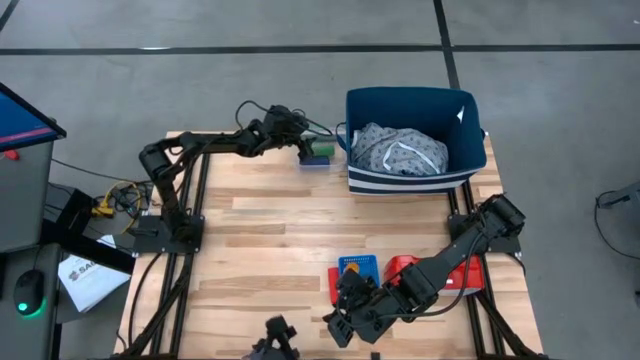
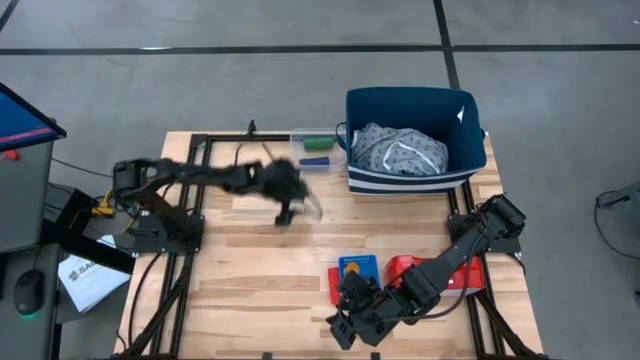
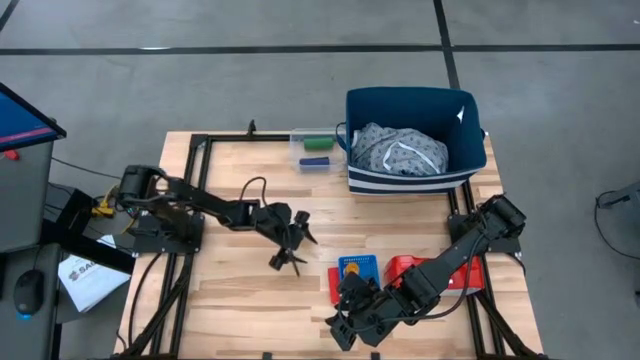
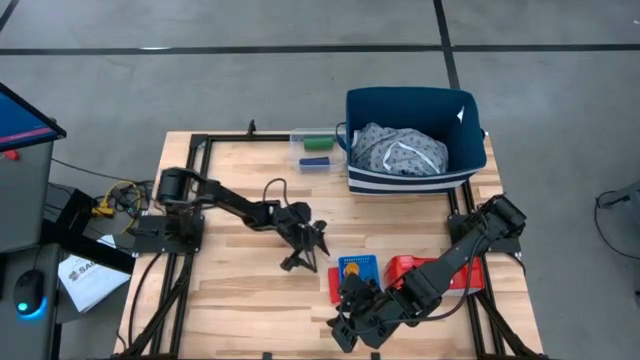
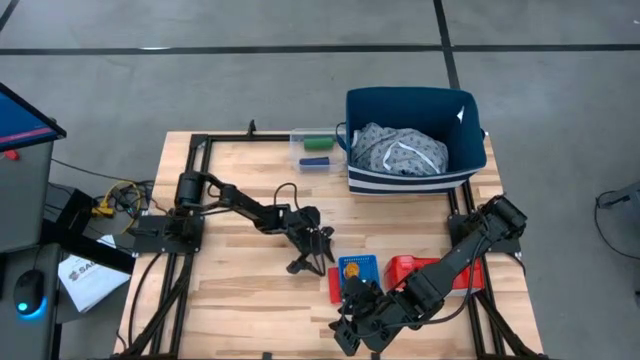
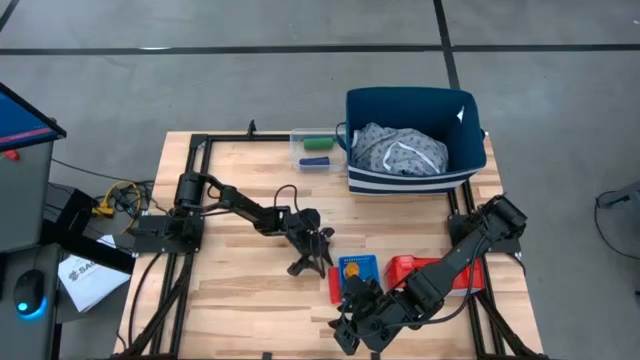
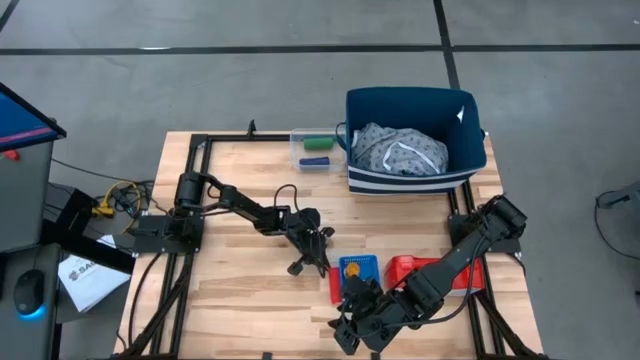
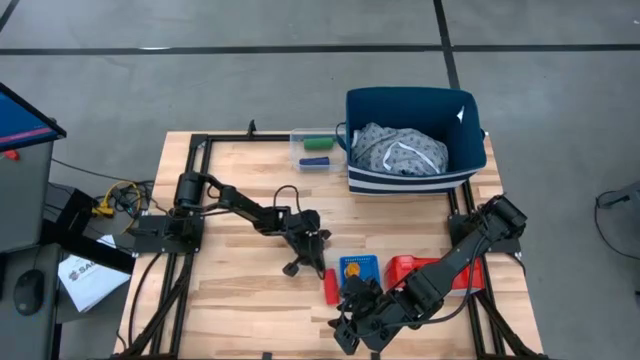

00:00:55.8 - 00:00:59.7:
Task: Pick & Place Medicine items
Put the red bandage into the transparent bin

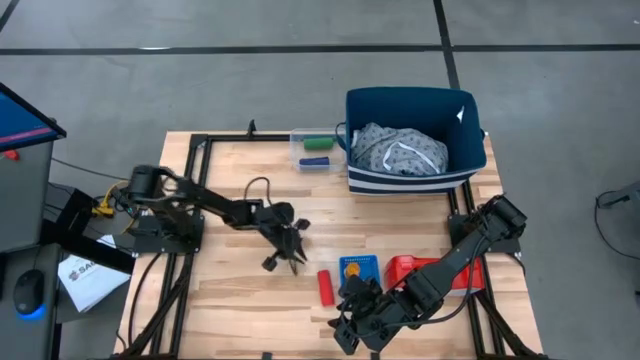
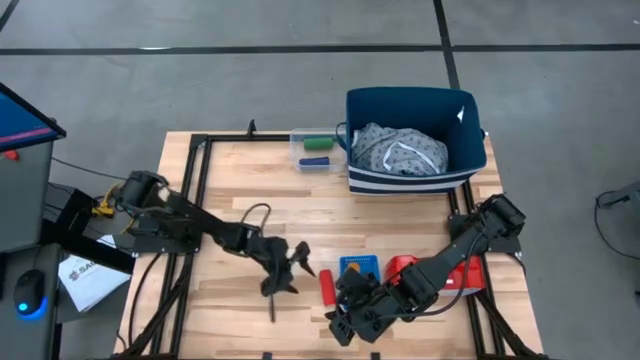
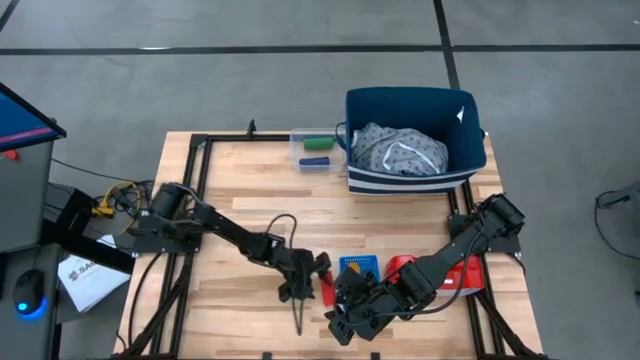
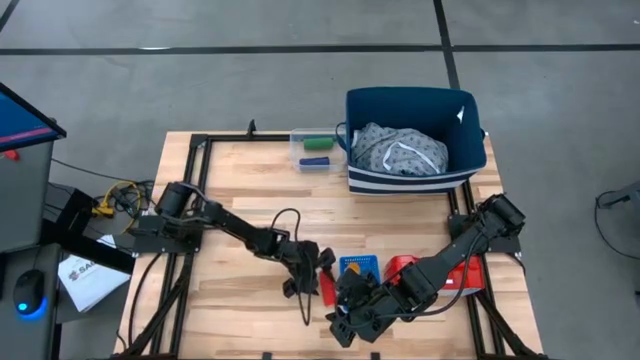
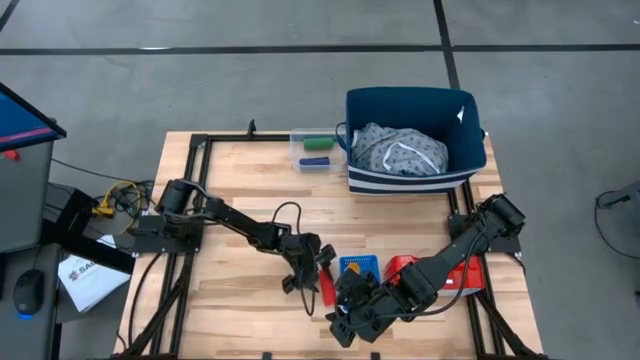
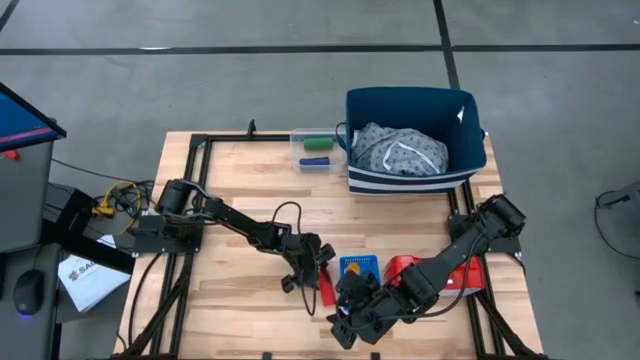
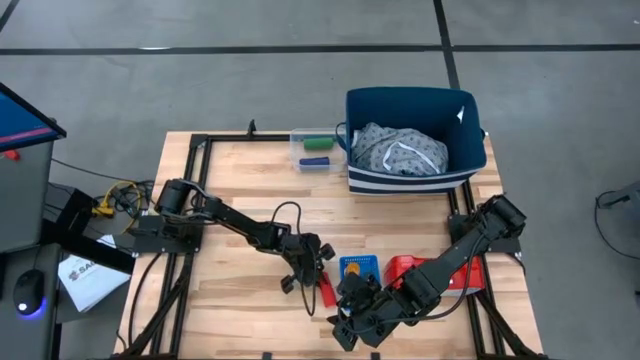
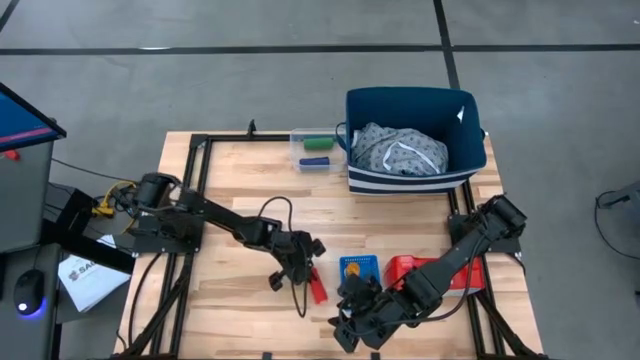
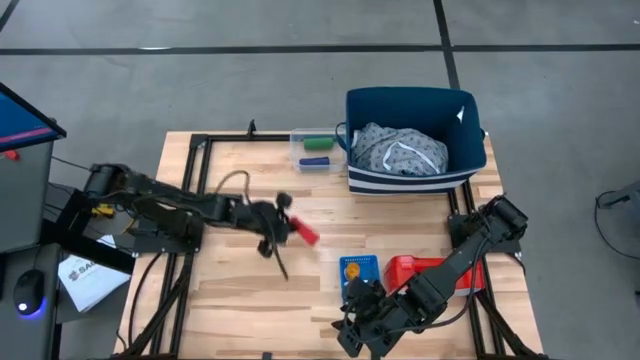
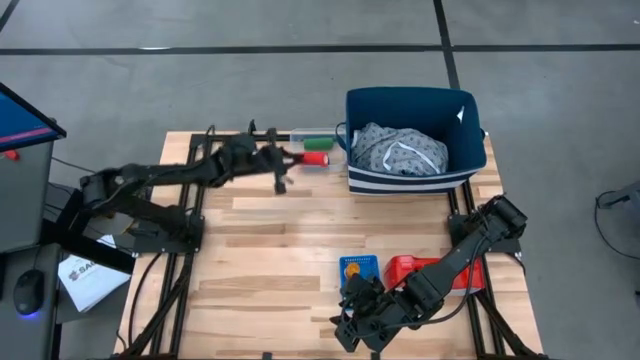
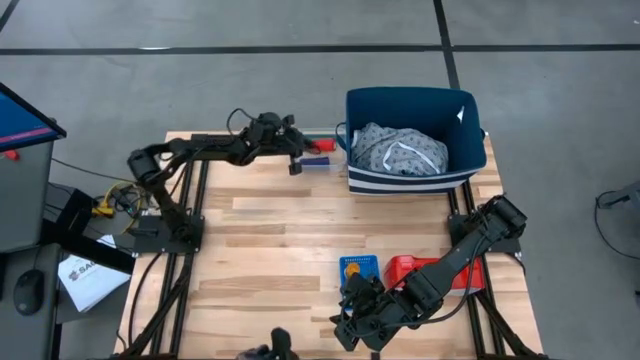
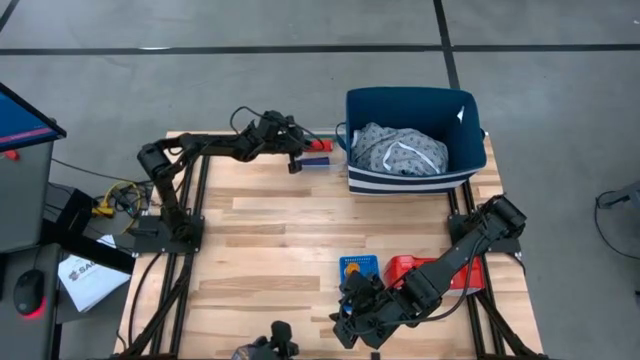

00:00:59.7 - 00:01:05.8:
Put the pink bandage into the transparent bin

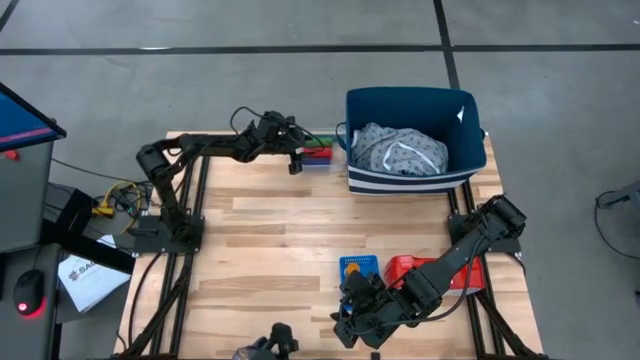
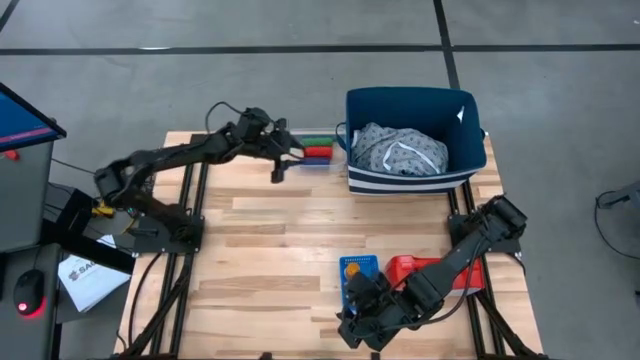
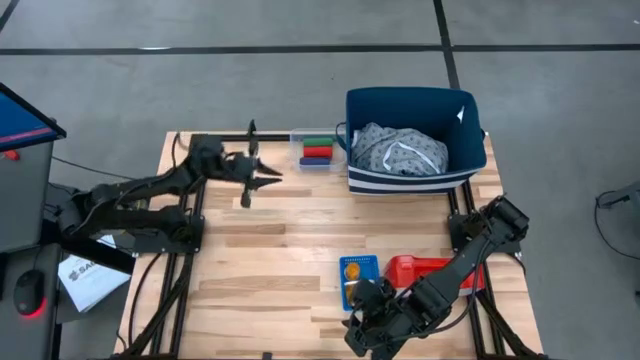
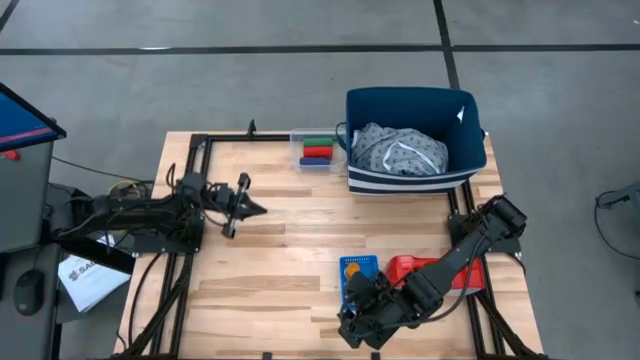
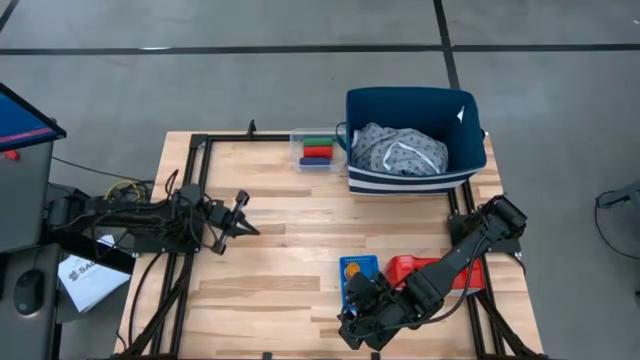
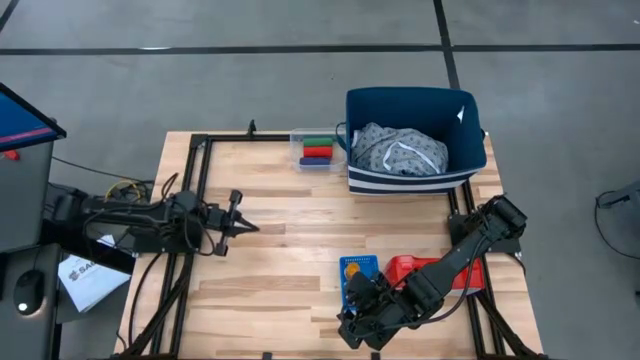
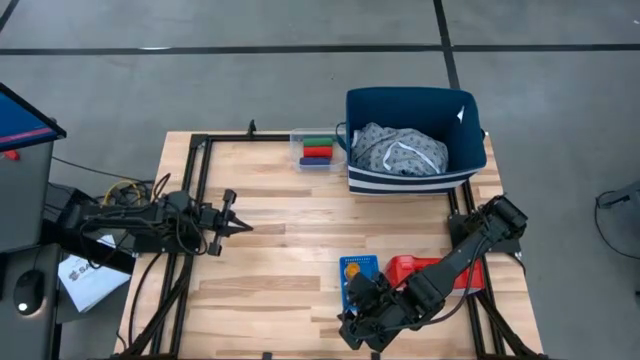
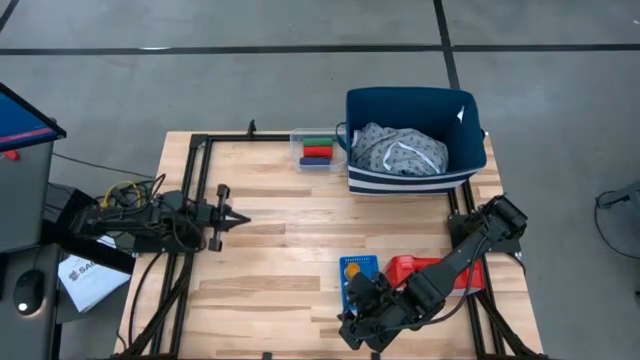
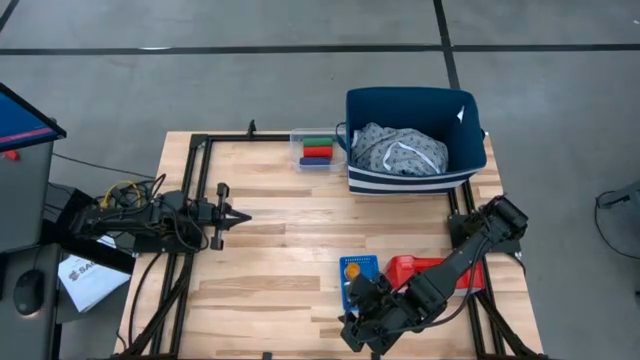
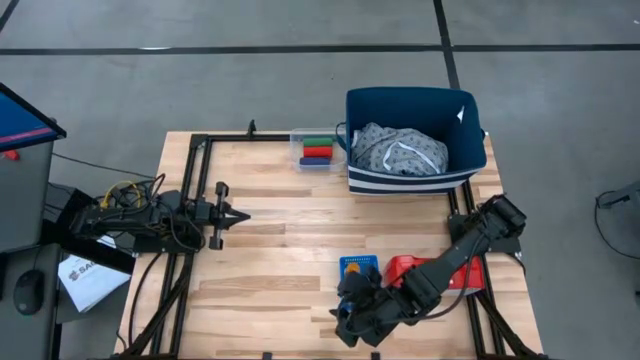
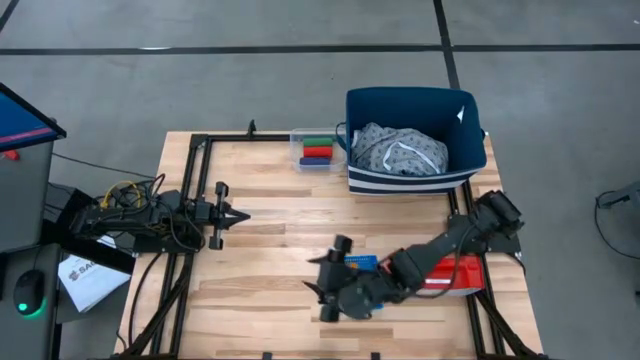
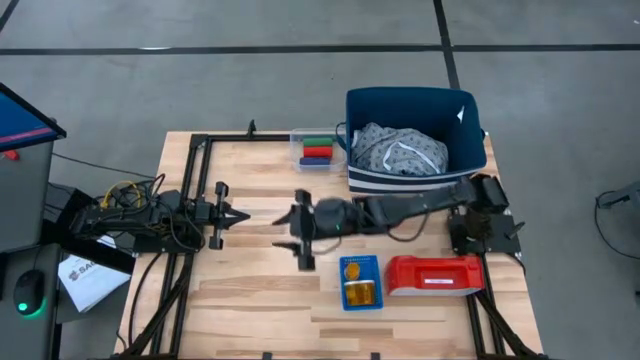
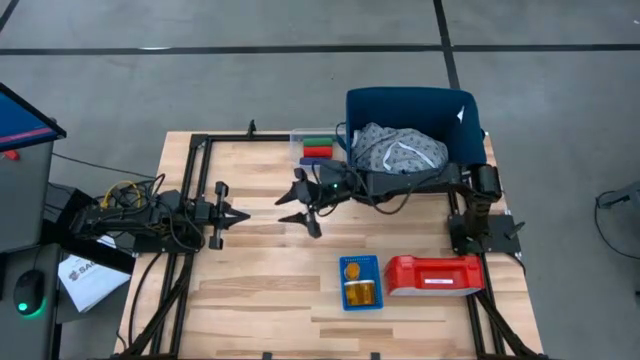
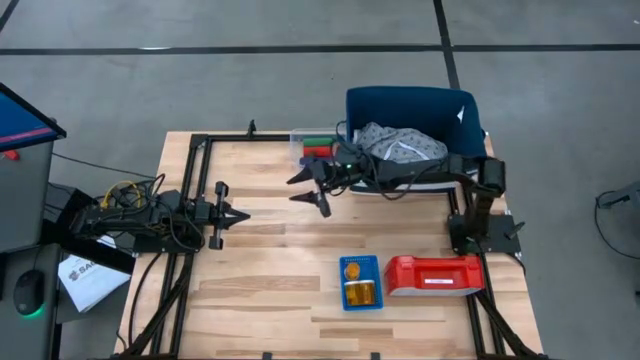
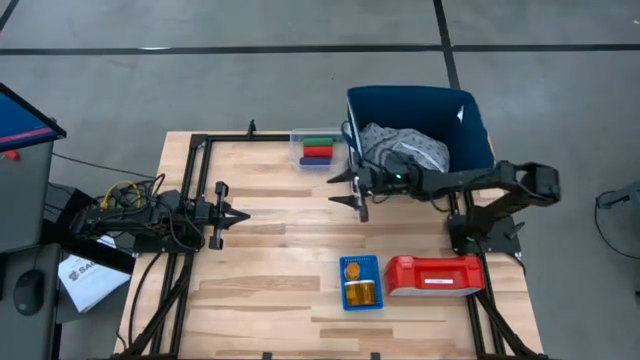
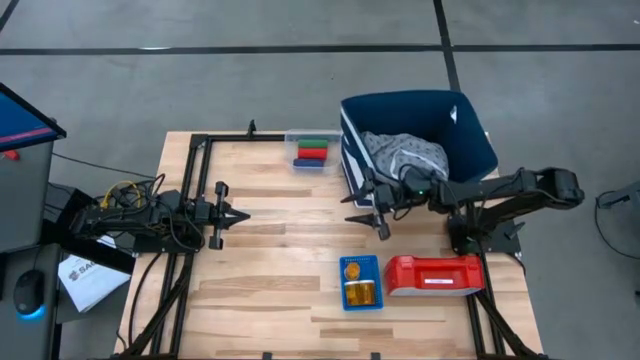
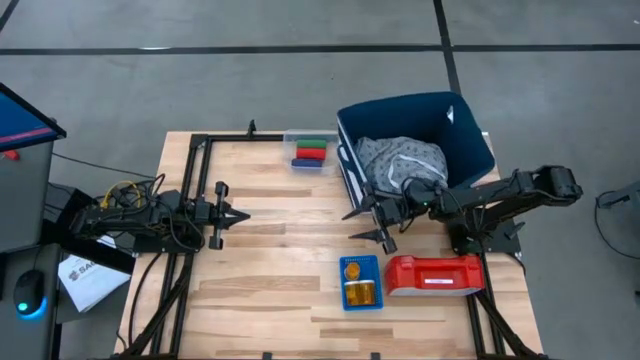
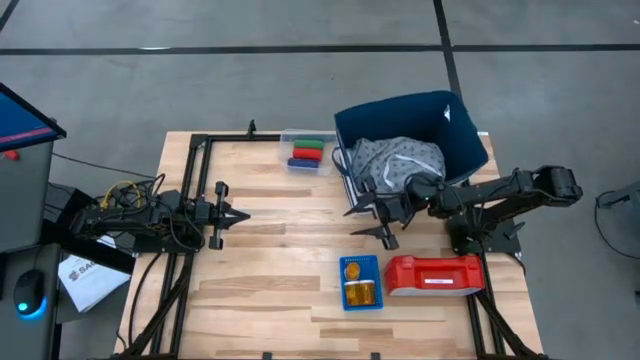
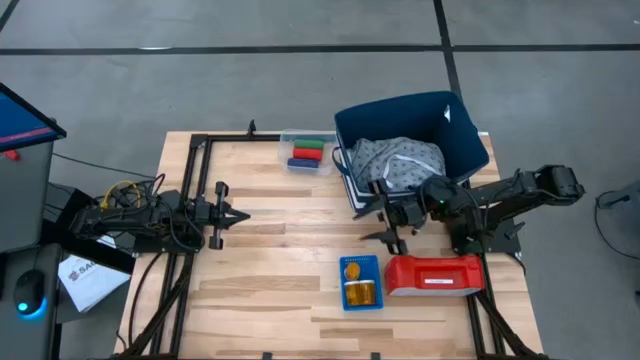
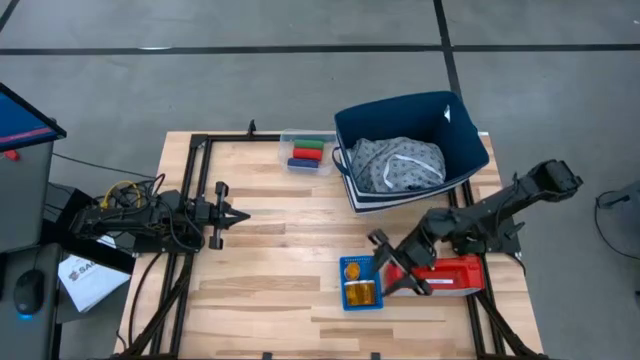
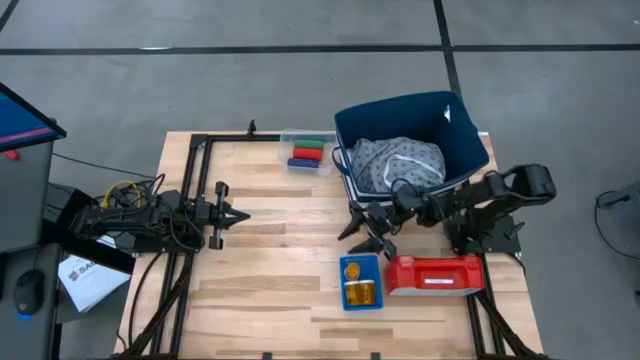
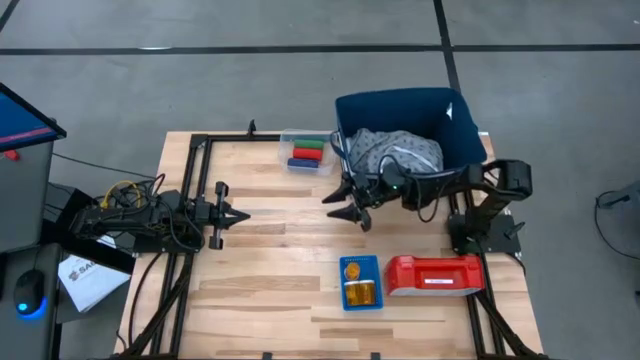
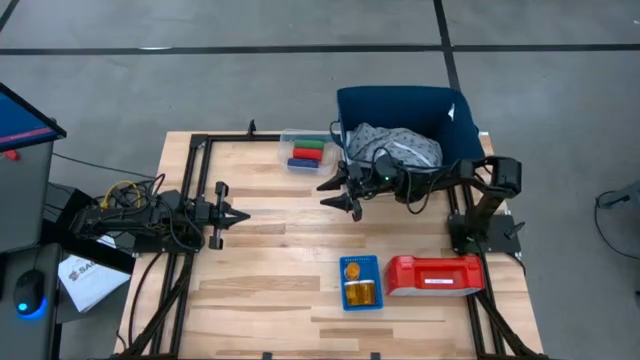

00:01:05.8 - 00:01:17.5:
Adjust the blue laundry organizer
